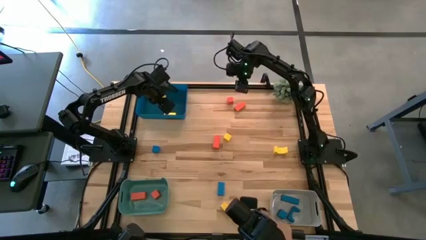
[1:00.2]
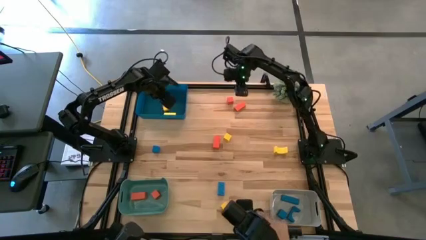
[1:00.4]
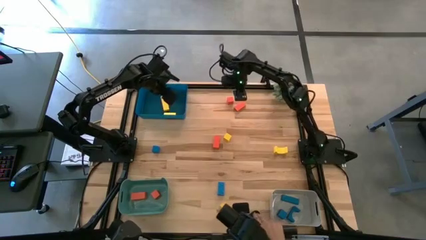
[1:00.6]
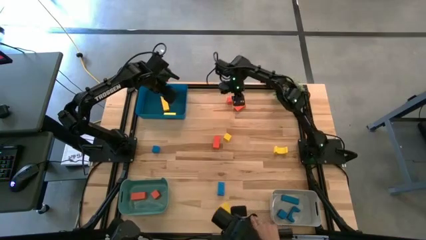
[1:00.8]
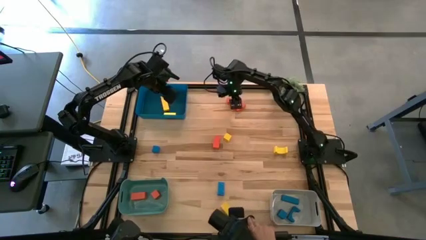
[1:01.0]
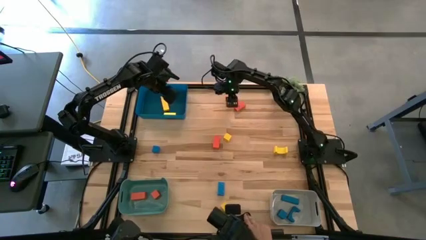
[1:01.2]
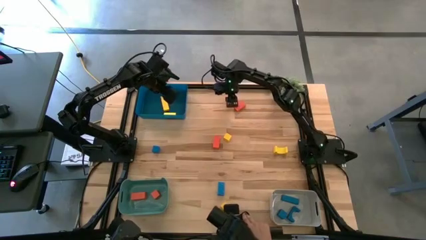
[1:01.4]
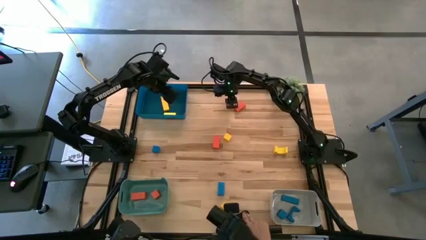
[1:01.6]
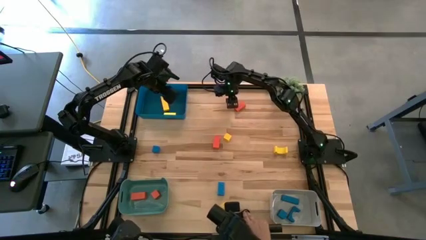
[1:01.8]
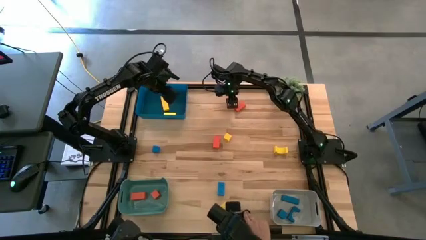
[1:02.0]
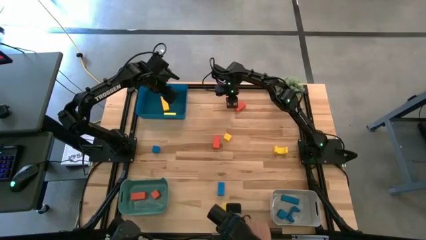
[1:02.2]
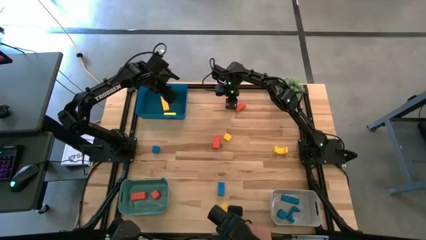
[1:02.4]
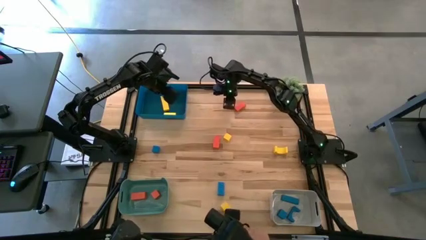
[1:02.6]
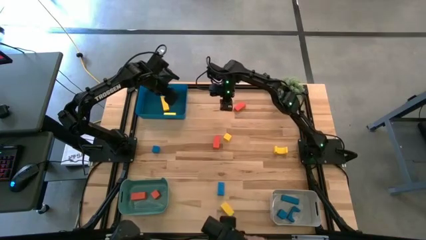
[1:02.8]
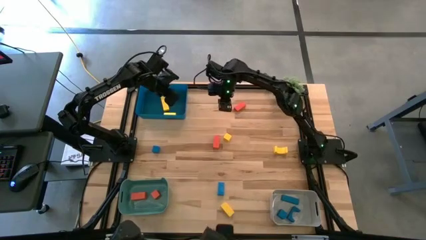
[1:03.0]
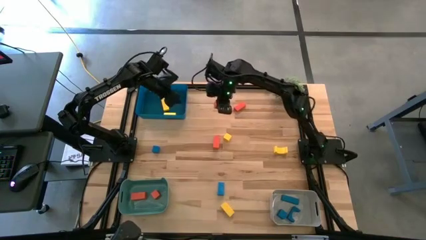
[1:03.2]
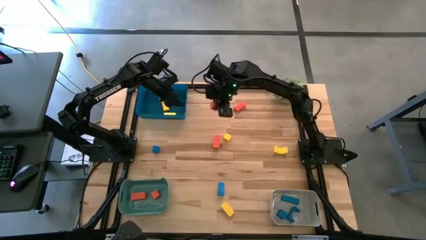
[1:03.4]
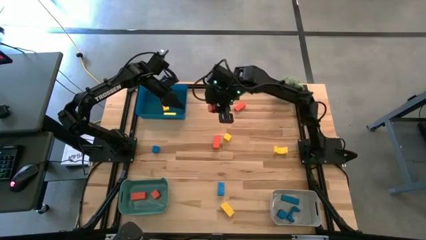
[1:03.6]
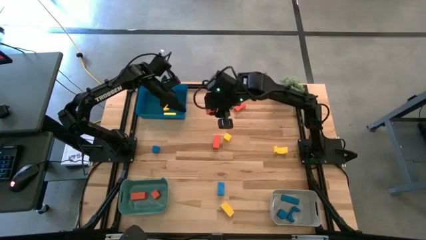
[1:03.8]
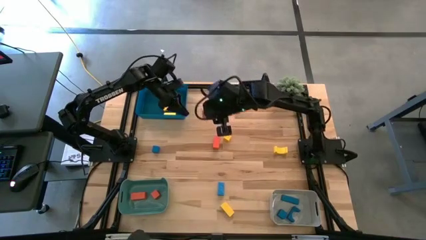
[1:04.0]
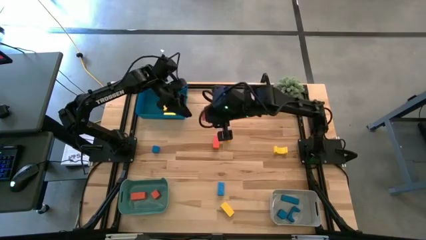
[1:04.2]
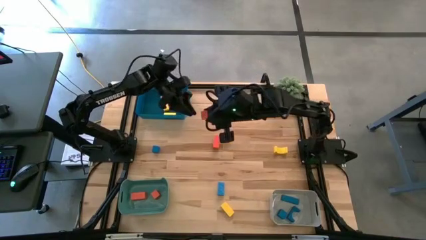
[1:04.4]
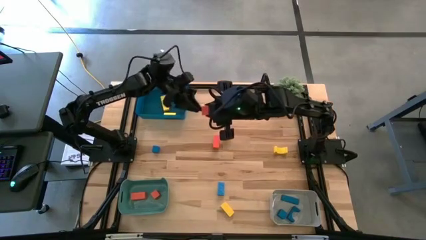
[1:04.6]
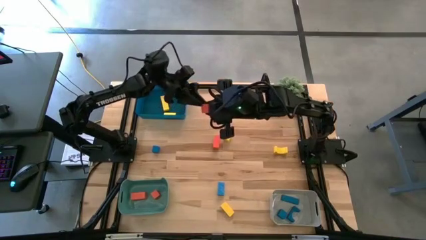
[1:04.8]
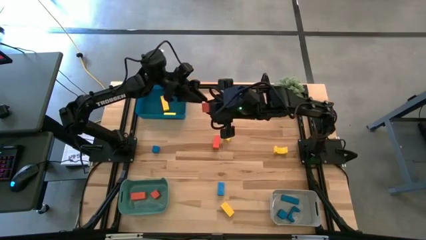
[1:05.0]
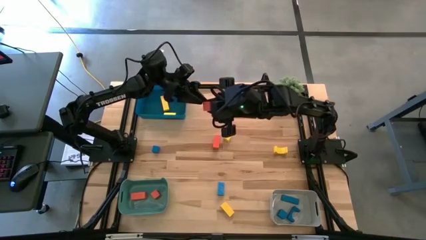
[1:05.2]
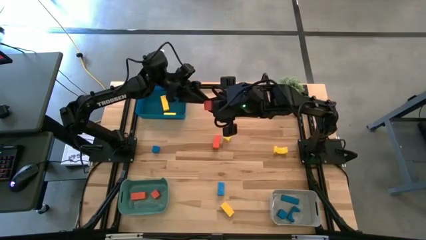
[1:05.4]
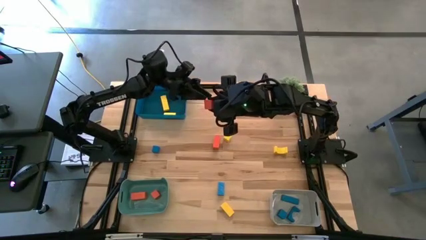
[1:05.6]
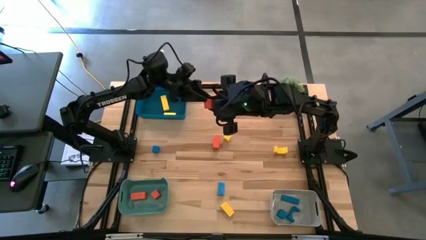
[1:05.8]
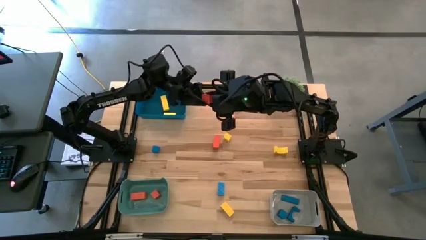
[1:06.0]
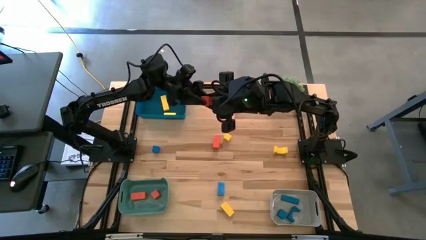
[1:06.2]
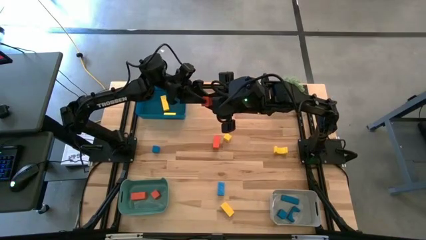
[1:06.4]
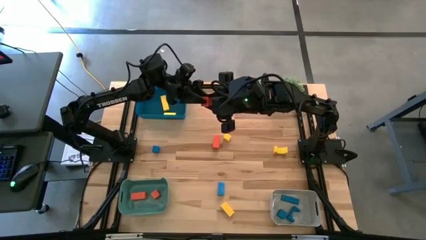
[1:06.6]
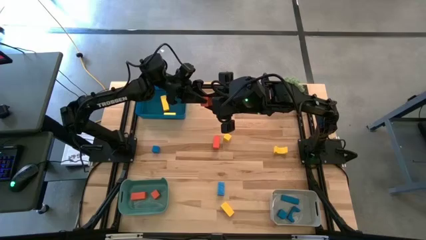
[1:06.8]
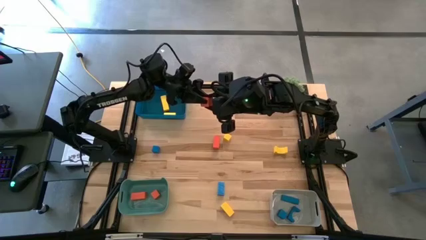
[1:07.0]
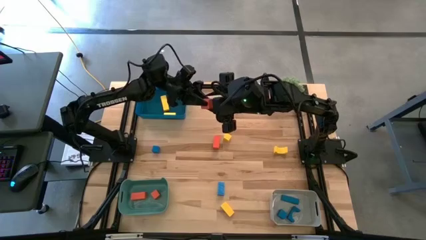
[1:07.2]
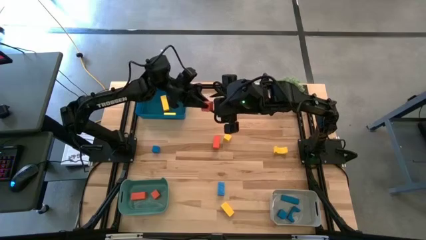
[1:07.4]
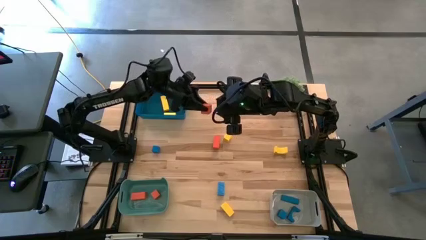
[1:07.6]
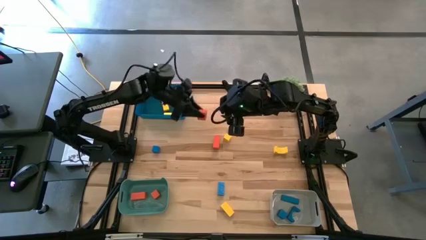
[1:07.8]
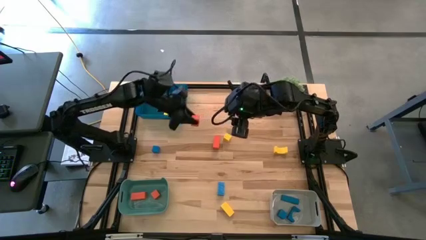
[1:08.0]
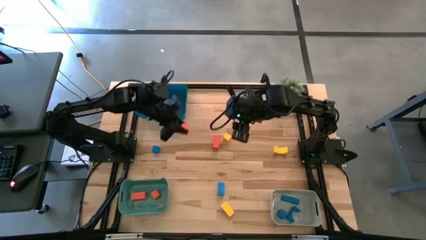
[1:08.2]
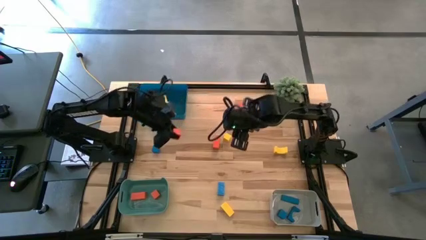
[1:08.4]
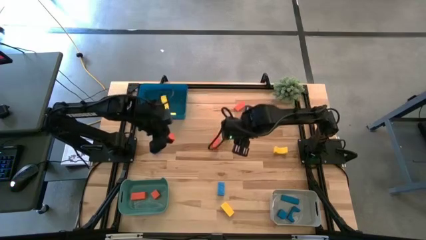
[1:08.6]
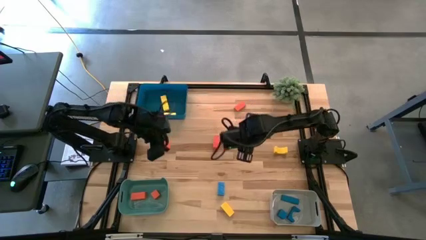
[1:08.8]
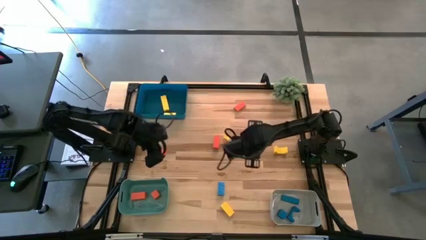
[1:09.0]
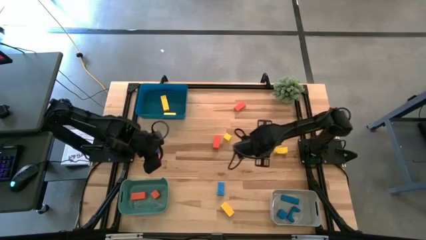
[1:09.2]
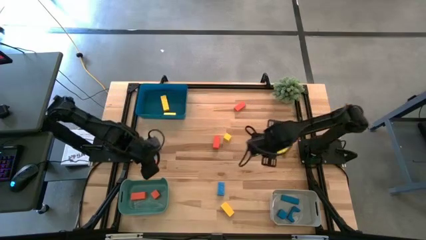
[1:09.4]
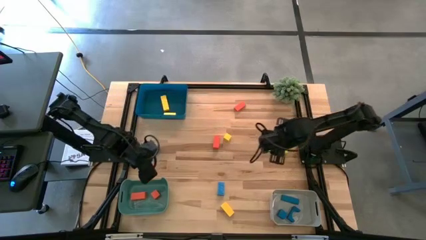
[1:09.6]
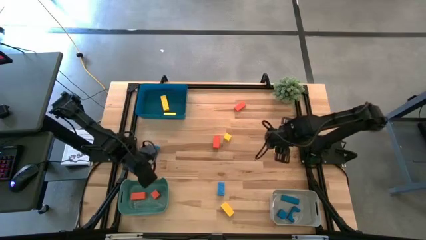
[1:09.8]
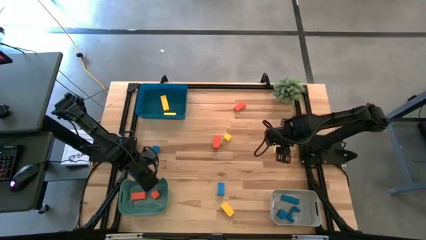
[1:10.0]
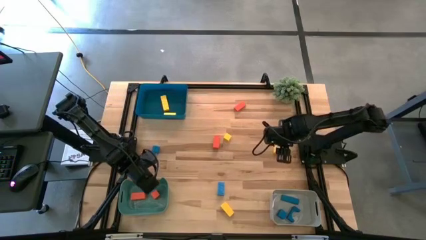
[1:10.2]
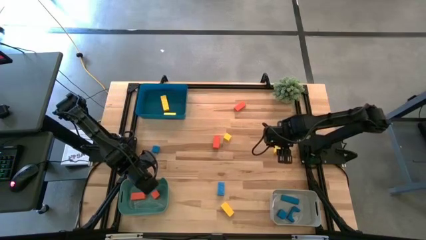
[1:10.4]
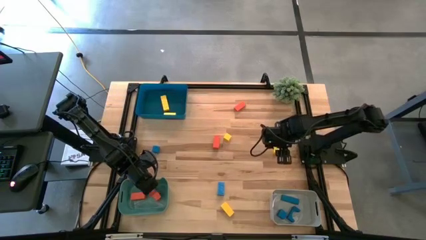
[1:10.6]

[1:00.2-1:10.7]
Task: Sort & place blocks by color
Put the top orange block into the green bin

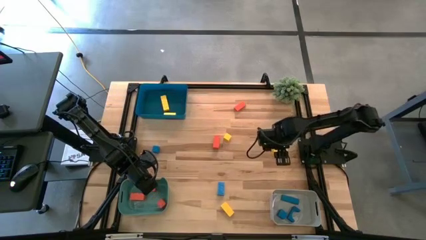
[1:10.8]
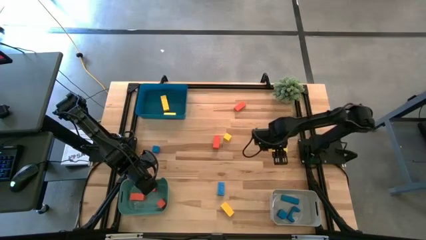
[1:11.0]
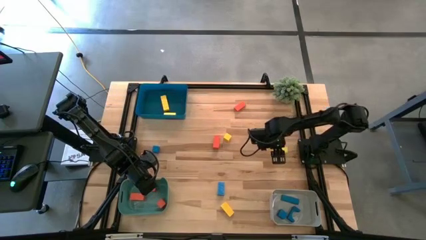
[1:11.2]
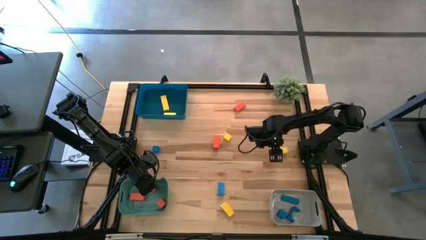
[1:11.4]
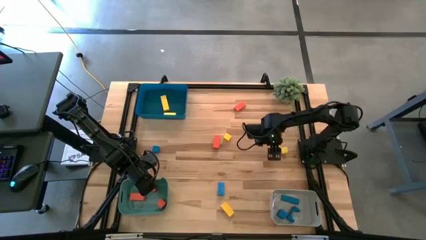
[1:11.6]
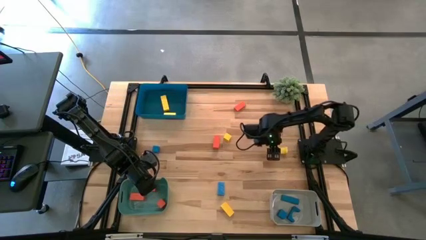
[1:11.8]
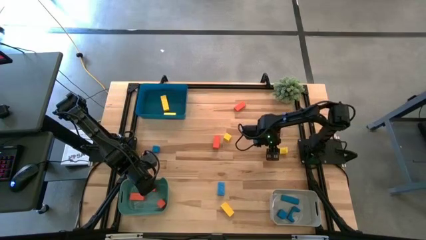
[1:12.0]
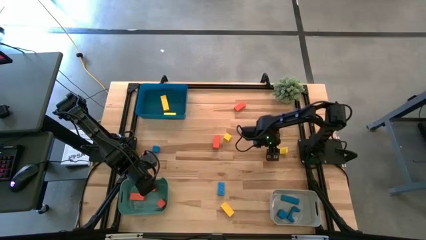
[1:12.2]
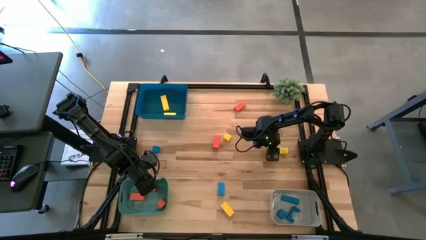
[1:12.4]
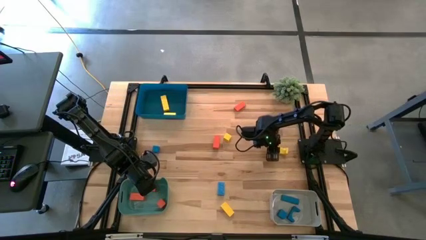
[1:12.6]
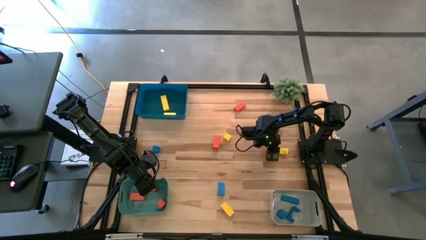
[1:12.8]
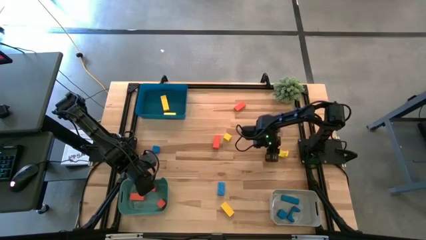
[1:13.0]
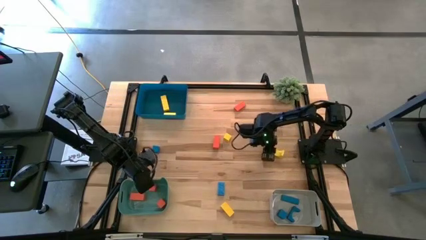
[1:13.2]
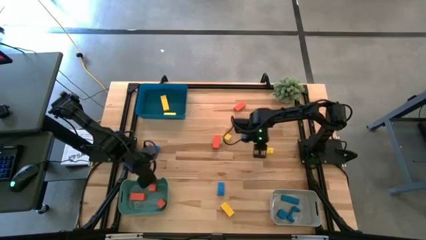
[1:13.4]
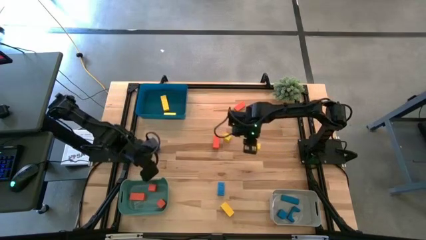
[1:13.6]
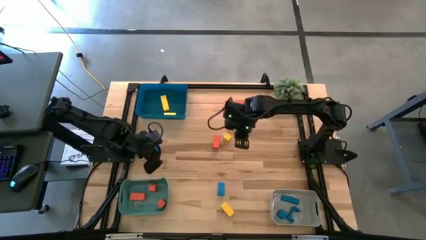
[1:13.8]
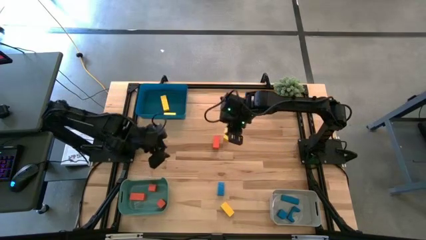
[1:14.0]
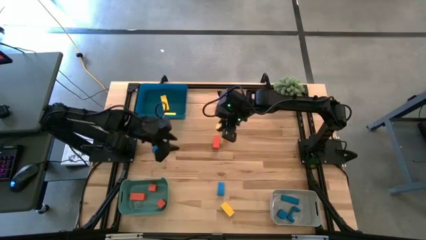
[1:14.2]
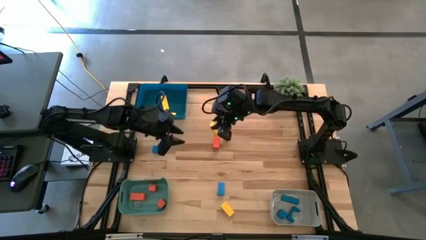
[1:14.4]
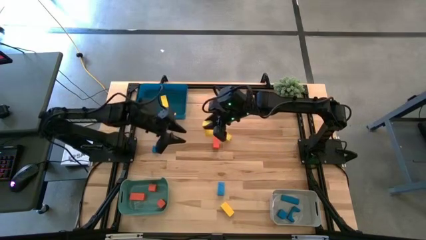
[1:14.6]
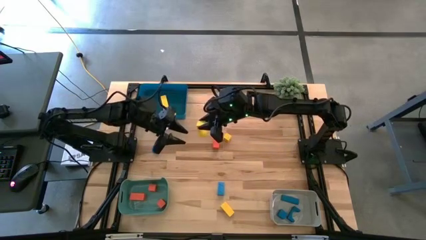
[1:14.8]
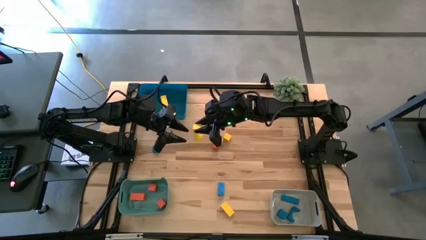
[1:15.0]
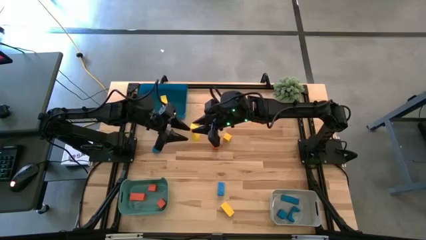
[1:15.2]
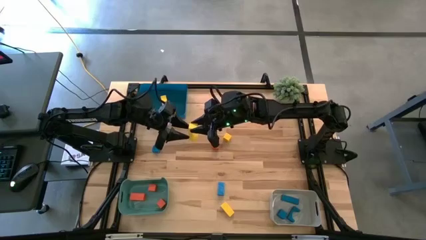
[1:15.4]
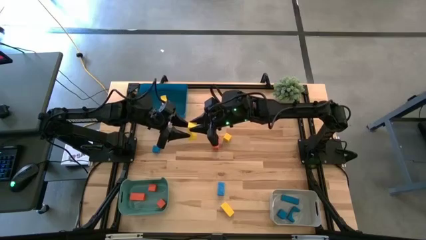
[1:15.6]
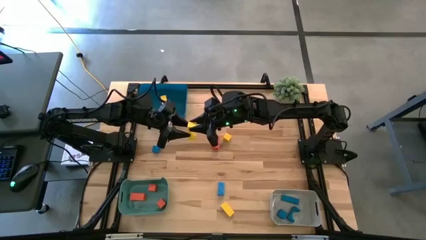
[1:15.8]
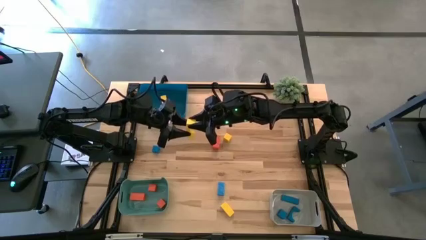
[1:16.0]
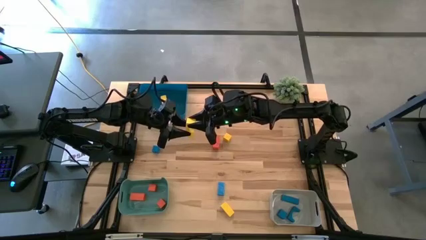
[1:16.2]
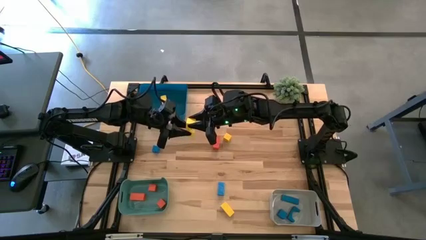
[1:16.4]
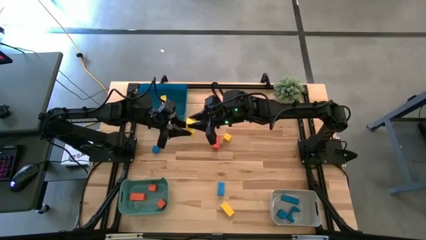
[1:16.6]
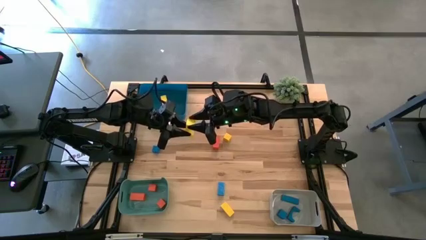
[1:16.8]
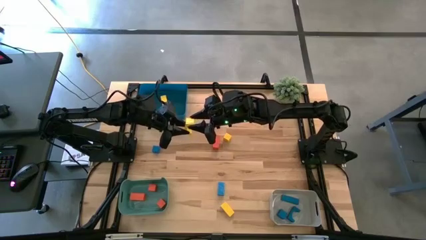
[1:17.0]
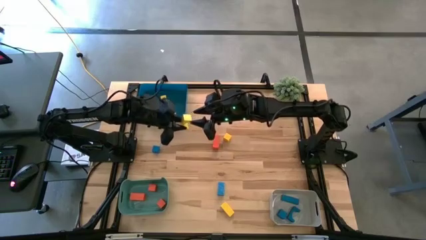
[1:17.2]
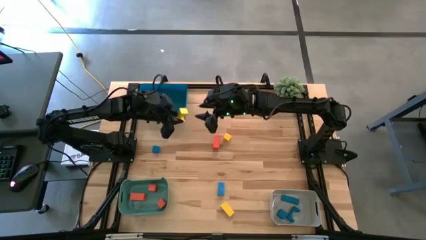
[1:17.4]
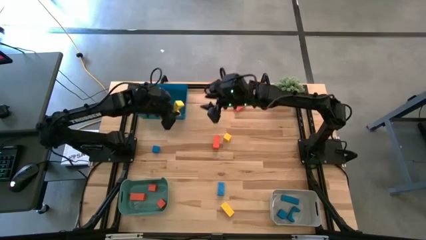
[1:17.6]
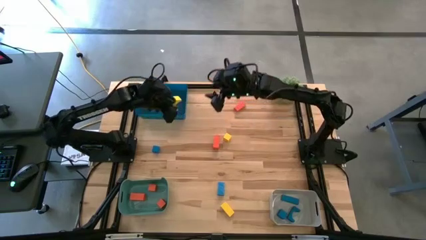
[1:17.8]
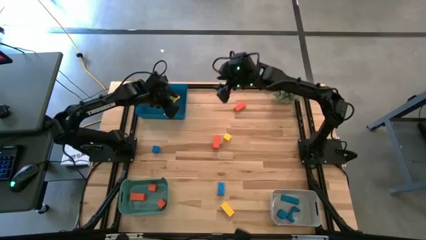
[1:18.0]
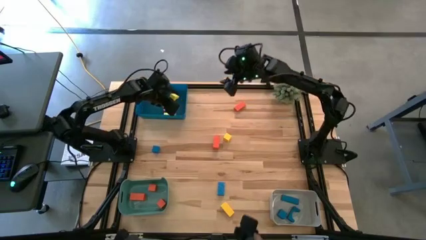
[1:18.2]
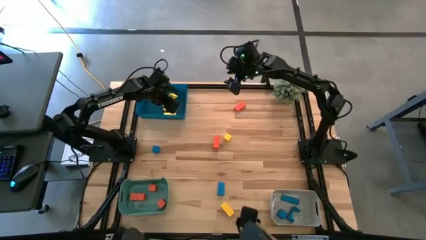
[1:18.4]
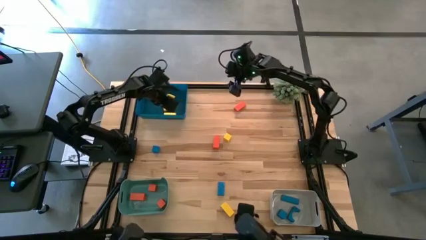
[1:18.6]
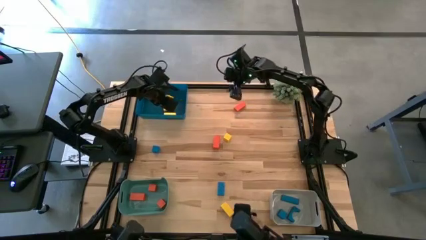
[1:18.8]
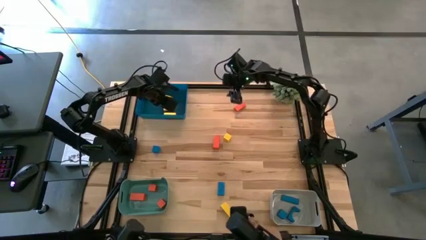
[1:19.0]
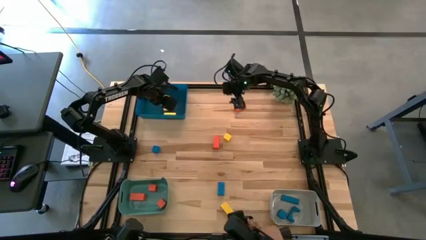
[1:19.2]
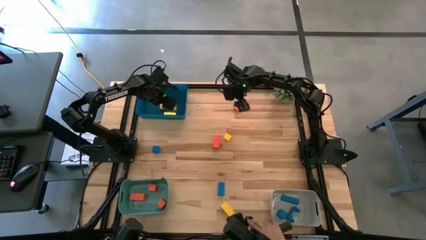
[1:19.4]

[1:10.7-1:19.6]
Put the right yellow block into the dark blue bin
